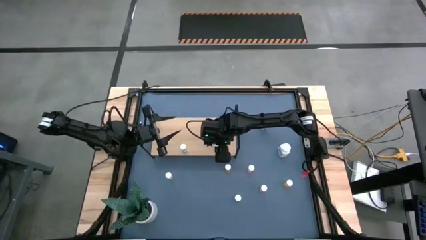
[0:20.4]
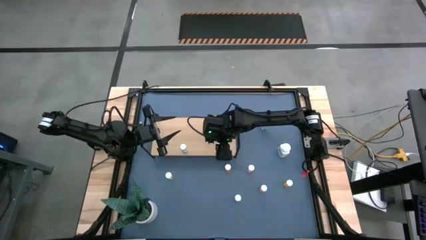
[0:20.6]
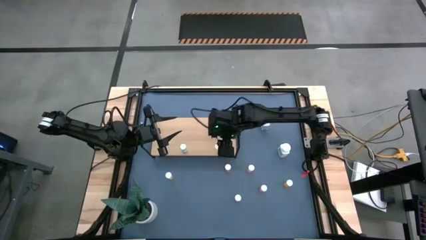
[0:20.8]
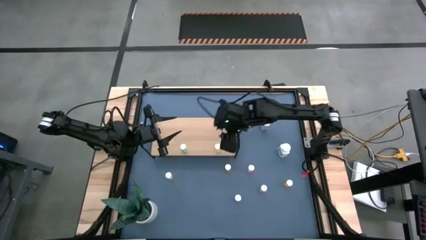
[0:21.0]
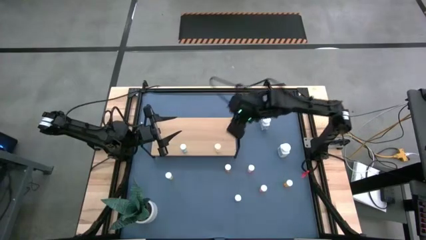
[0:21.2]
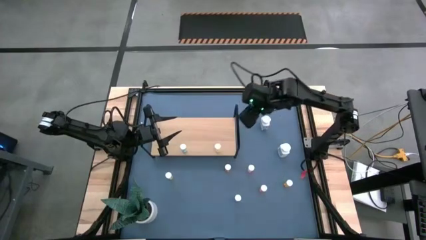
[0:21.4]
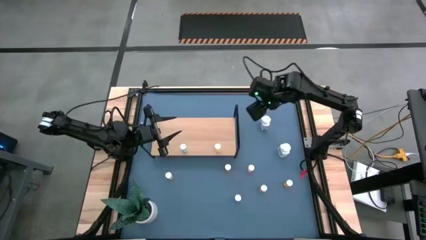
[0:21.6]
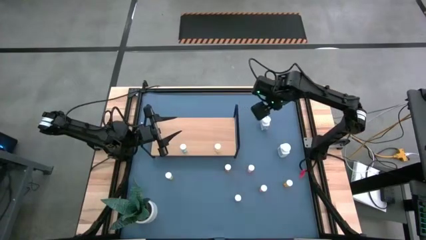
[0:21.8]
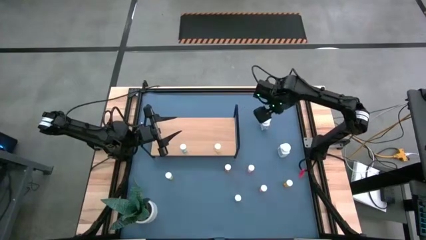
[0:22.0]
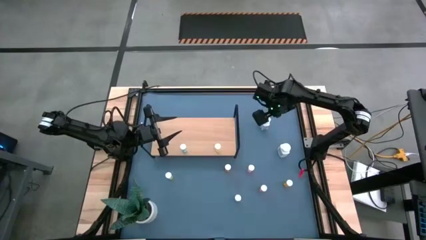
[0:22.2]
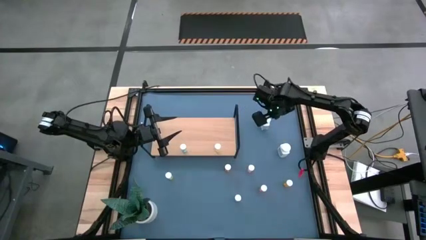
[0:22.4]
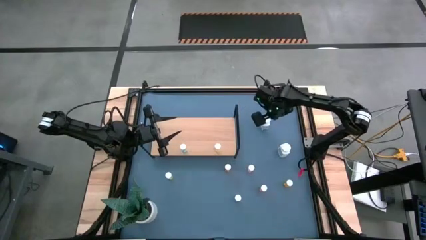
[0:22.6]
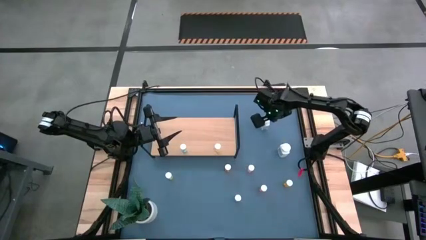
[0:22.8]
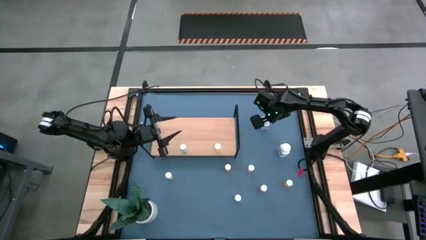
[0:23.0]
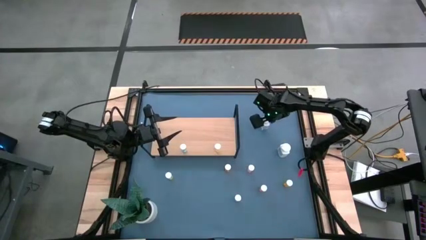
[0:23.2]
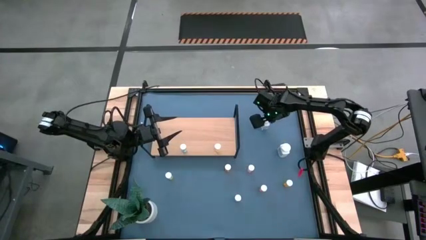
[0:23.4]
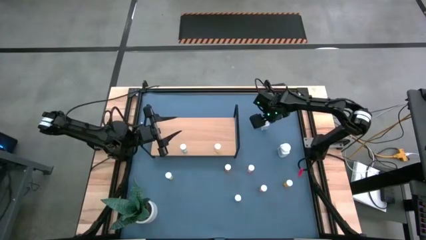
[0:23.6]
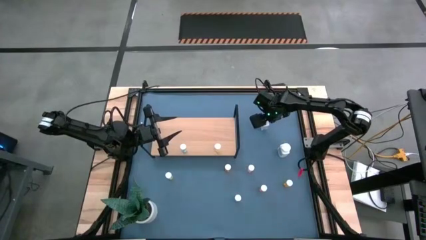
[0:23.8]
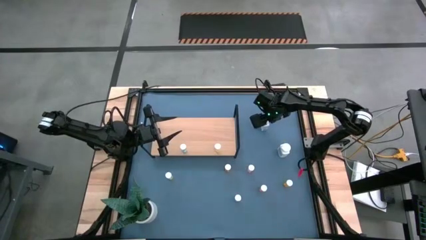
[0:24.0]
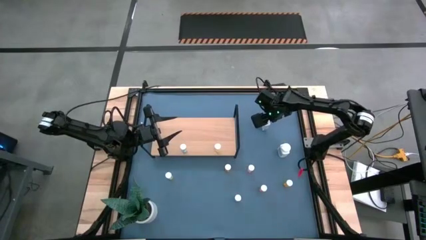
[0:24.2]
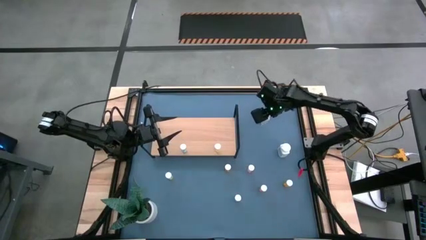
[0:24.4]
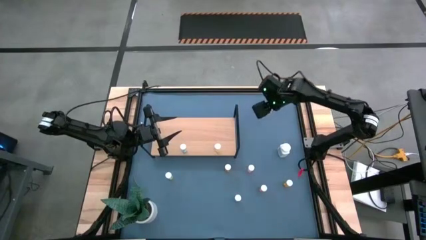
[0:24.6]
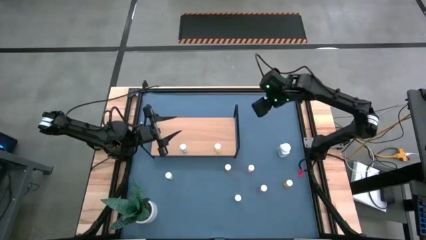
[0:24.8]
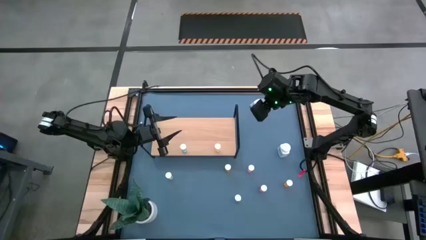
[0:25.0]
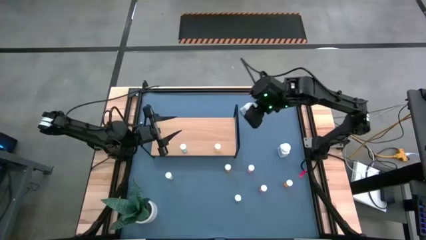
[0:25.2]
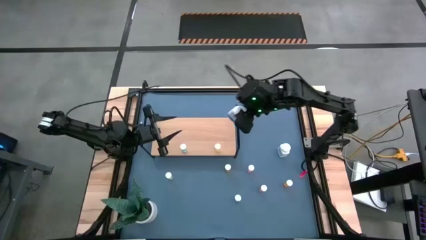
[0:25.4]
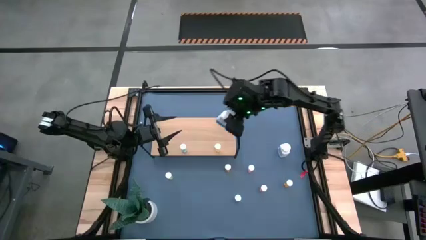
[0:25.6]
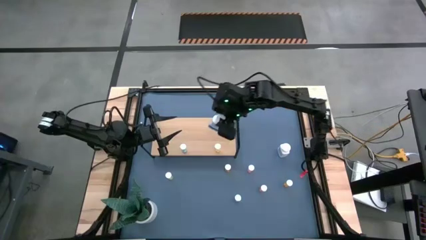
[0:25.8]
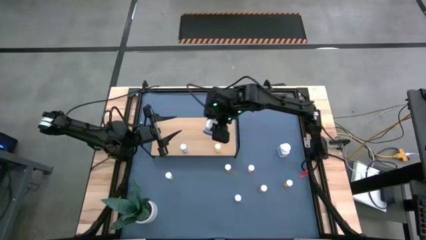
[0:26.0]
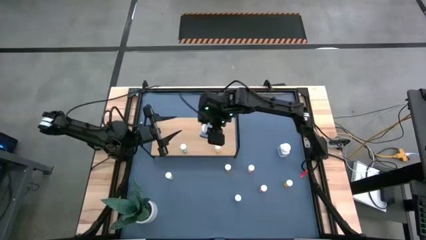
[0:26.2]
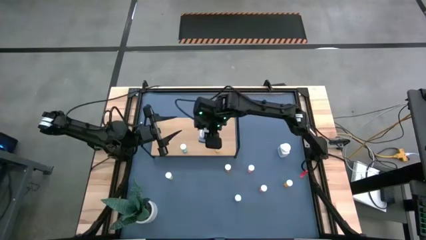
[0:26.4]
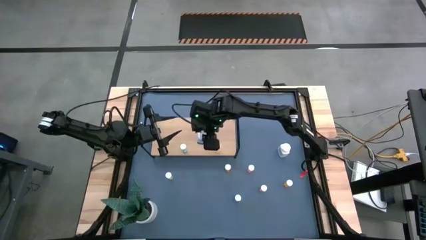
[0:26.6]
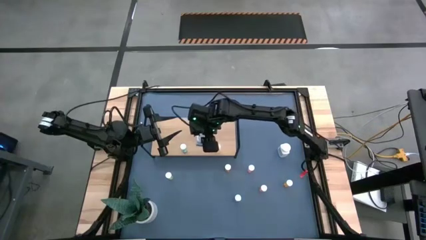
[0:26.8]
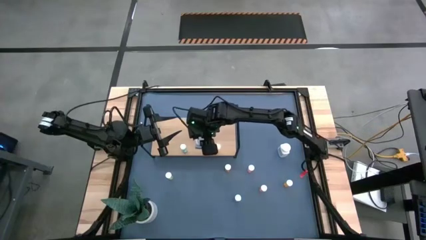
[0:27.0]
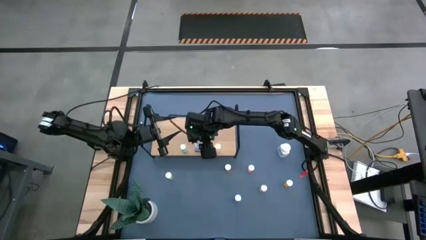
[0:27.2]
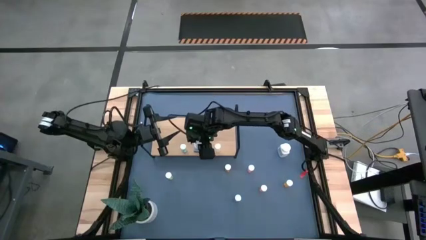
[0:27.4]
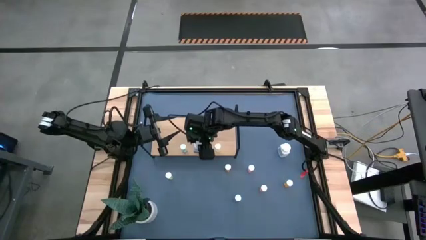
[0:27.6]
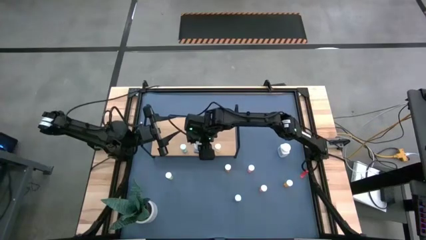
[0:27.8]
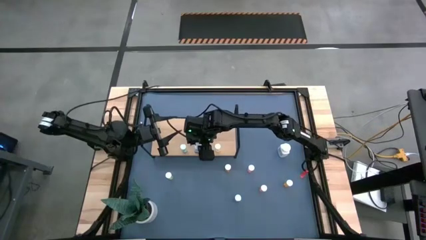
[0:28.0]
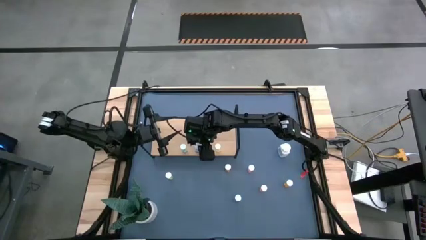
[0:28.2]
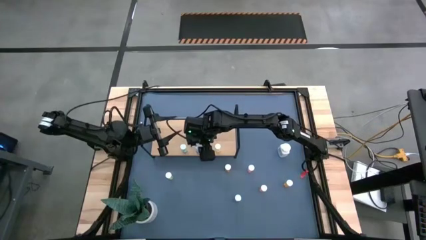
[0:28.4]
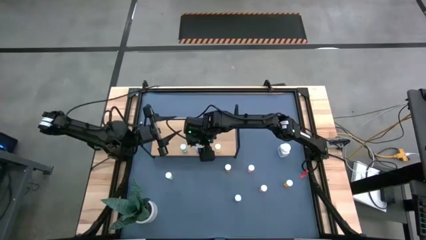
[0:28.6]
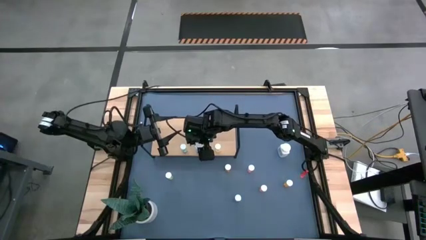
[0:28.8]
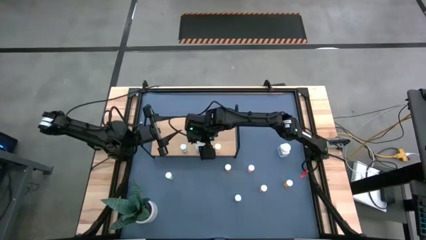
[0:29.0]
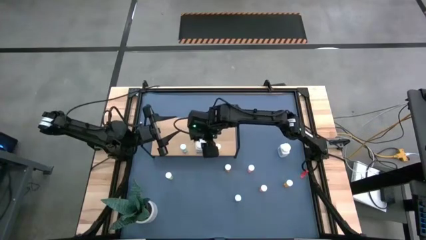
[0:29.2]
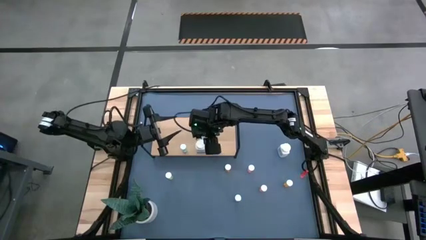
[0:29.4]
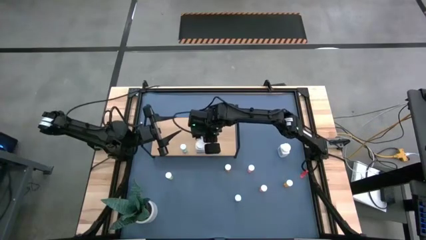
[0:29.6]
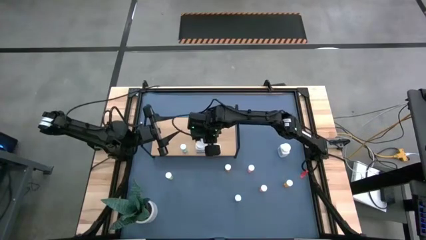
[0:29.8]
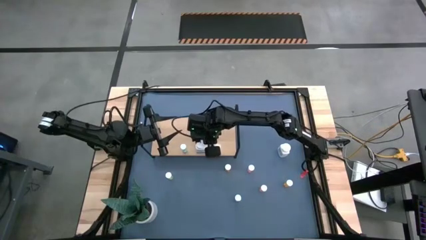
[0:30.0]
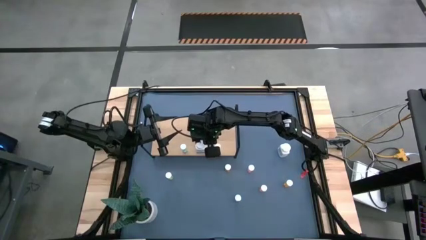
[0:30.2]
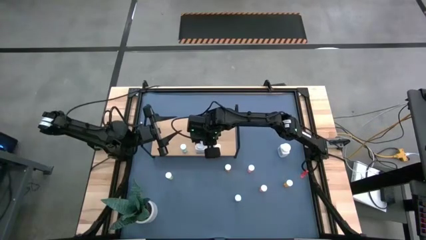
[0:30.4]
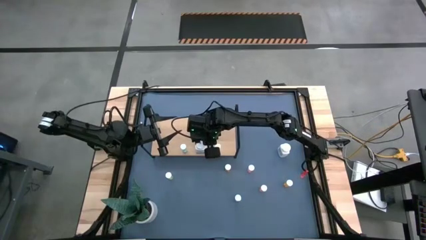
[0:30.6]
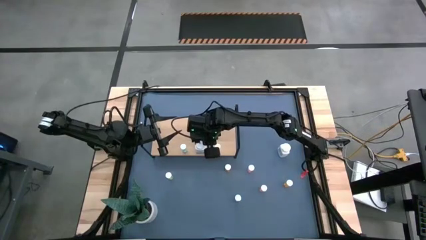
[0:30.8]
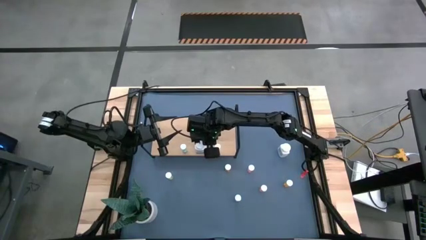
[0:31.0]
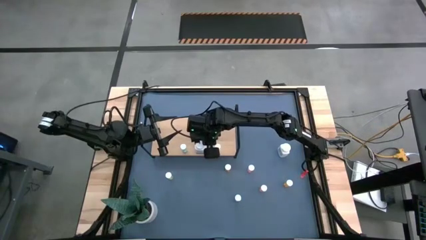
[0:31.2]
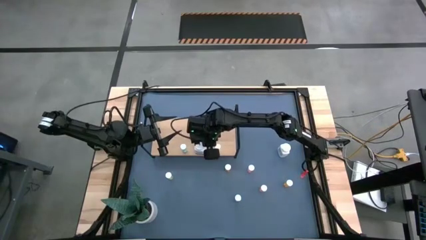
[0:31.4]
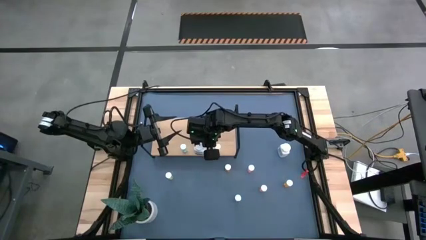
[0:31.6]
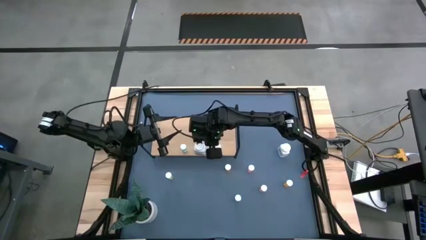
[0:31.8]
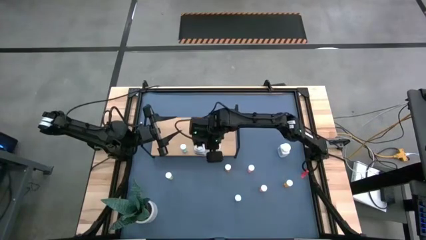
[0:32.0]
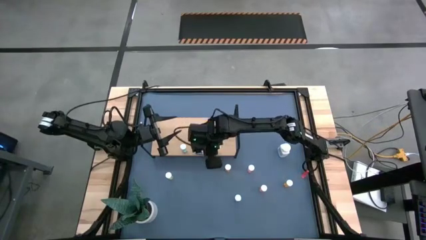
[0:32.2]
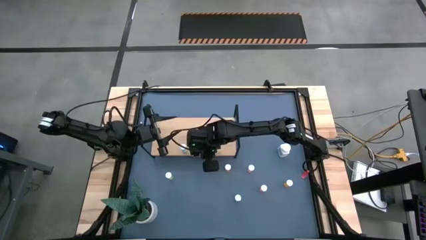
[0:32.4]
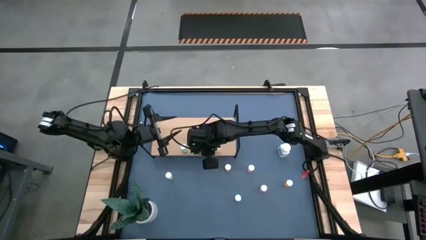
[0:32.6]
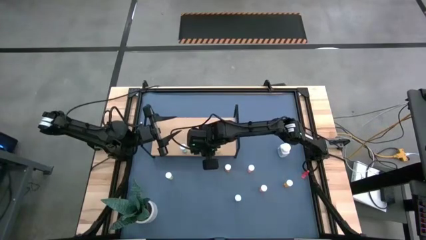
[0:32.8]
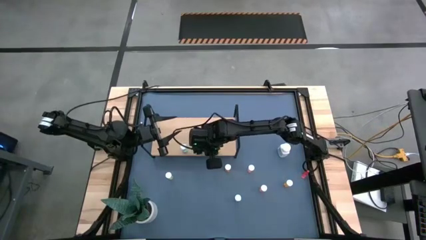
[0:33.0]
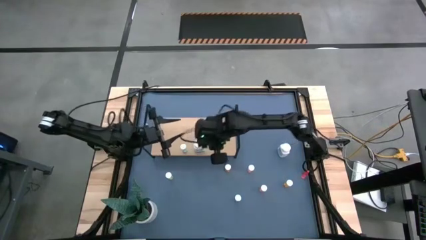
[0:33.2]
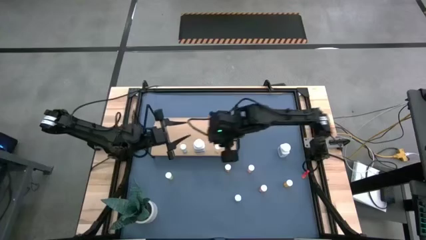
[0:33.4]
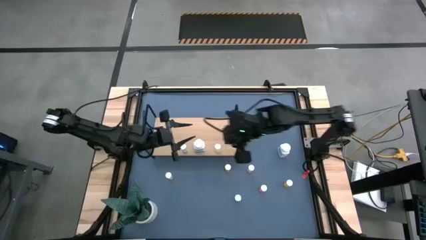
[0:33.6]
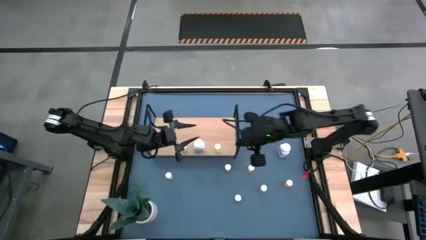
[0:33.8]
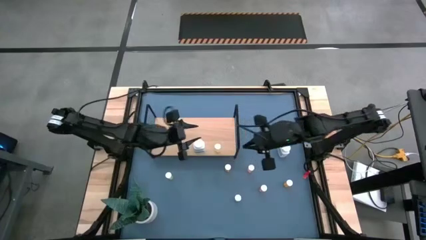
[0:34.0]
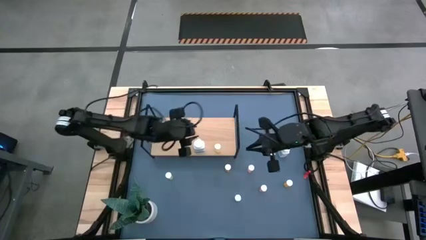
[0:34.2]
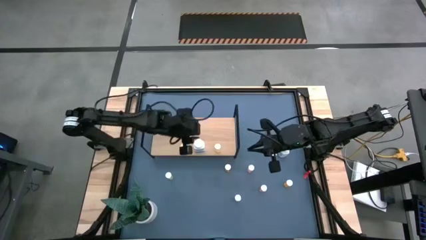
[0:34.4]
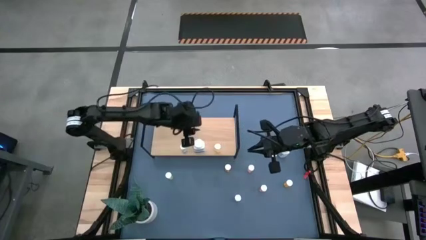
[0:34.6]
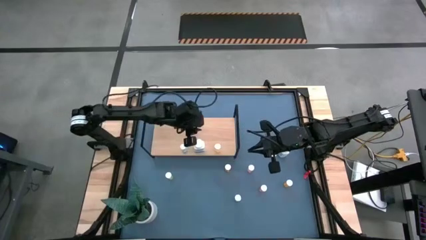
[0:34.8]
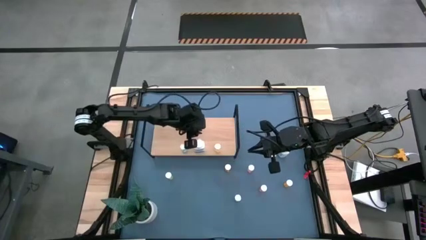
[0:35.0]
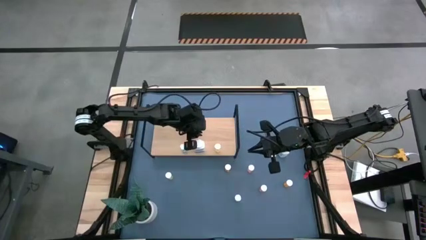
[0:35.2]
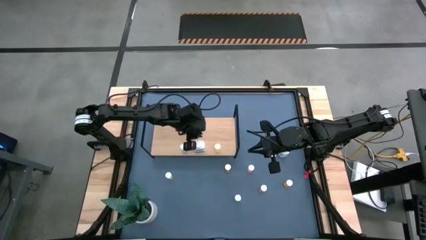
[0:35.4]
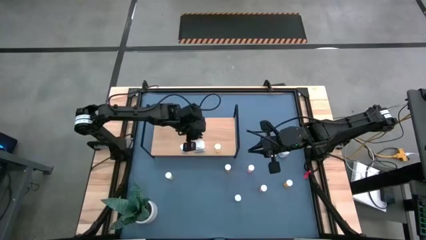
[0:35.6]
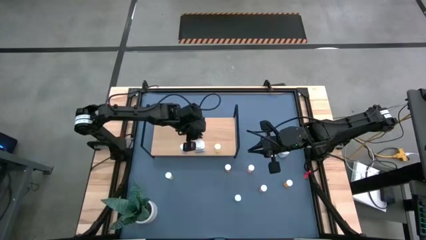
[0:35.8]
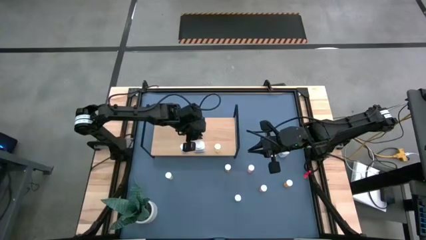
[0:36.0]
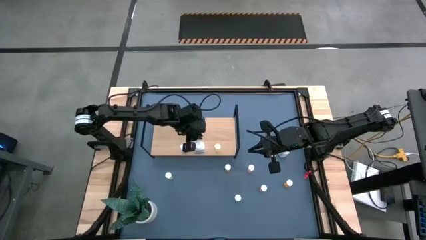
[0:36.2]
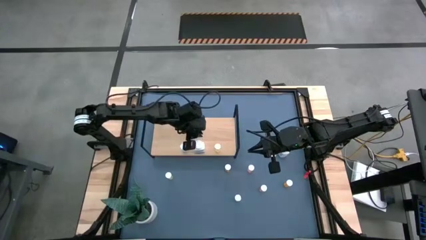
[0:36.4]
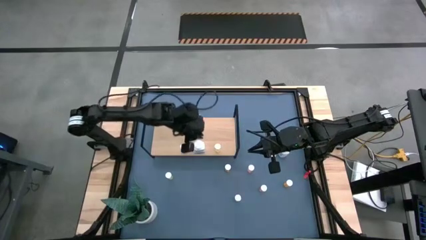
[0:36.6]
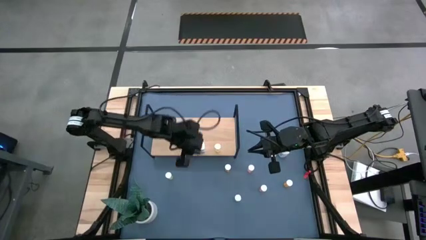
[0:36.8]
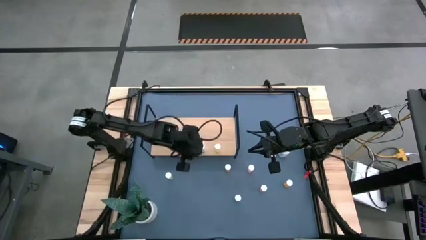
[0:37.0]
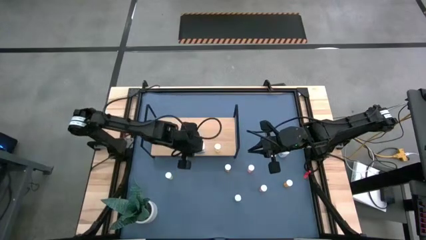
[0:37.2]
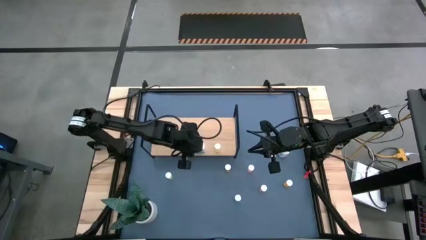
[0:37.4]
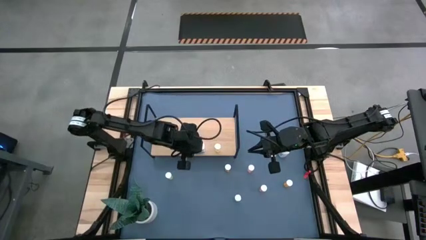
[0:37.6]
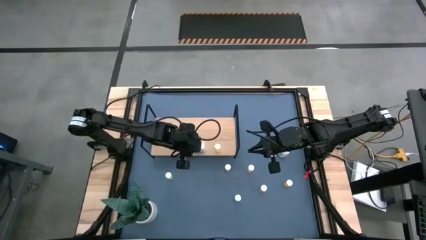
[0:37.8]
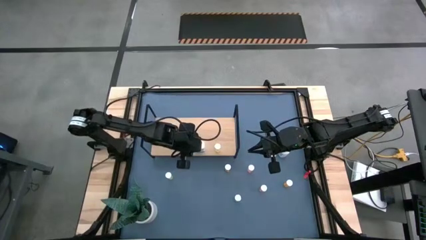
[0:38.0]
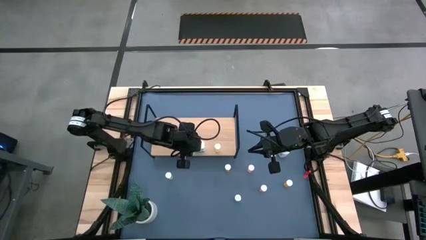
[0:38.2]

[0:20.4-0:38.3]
Task: Pick and place medicine bottles onto shelf by color
Put the top white pill bottle on the shelf
